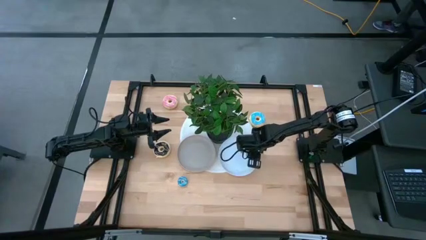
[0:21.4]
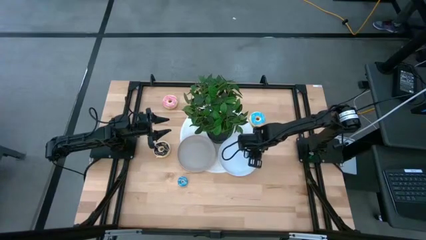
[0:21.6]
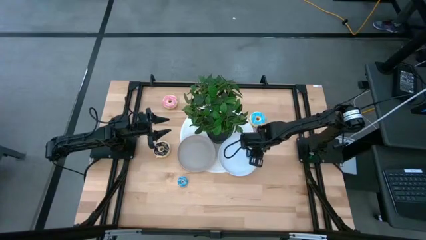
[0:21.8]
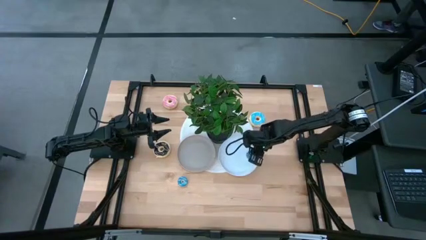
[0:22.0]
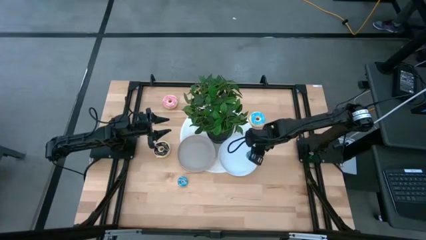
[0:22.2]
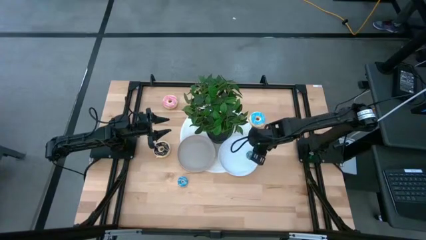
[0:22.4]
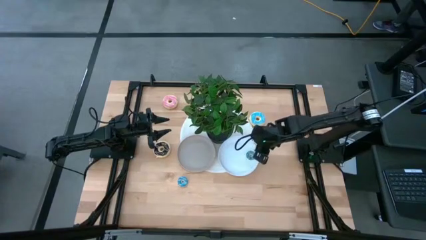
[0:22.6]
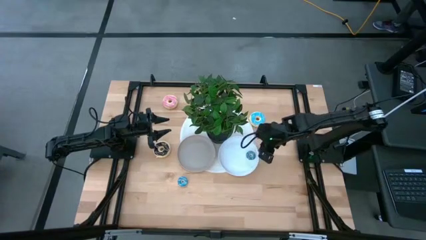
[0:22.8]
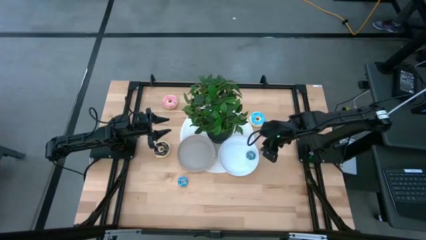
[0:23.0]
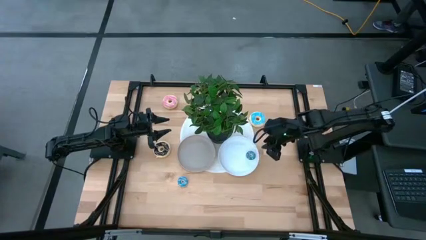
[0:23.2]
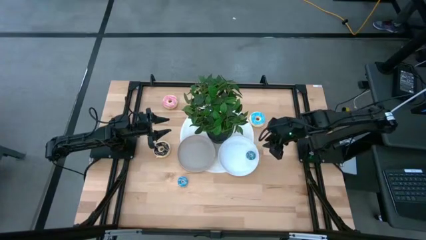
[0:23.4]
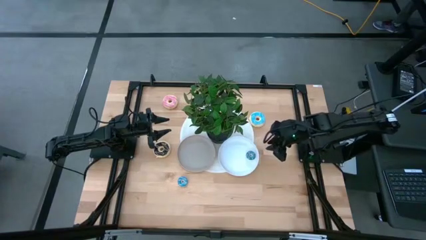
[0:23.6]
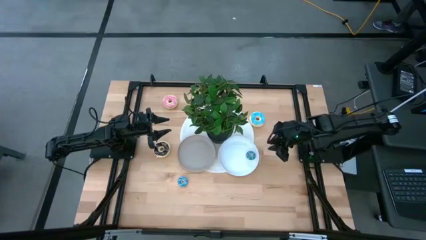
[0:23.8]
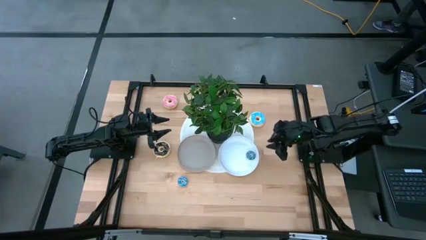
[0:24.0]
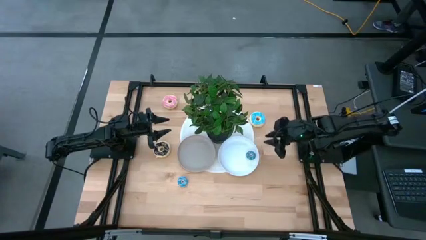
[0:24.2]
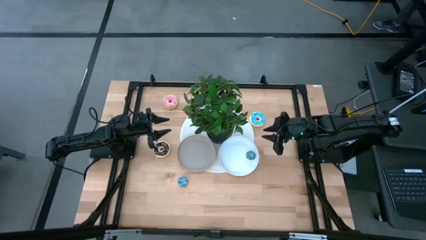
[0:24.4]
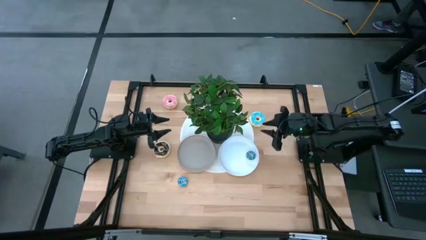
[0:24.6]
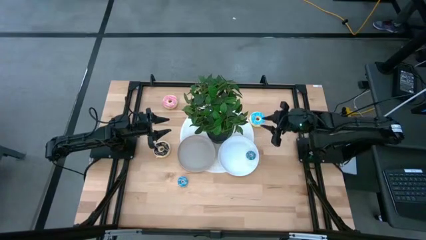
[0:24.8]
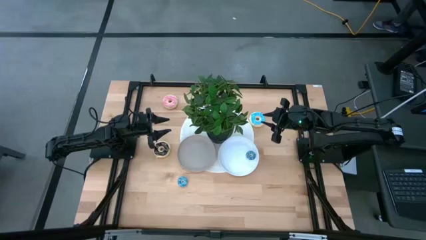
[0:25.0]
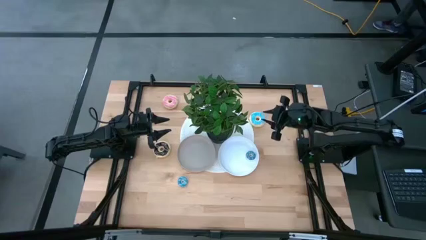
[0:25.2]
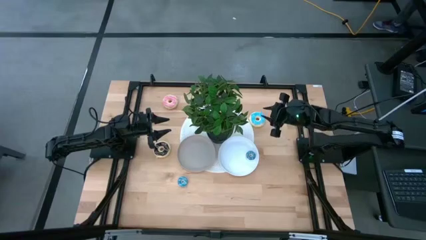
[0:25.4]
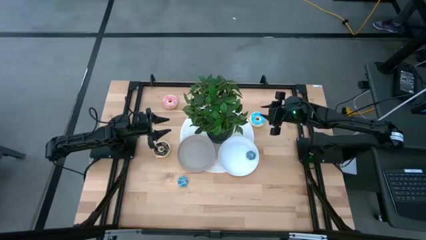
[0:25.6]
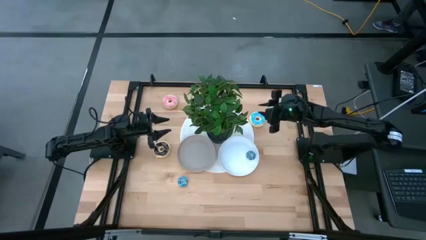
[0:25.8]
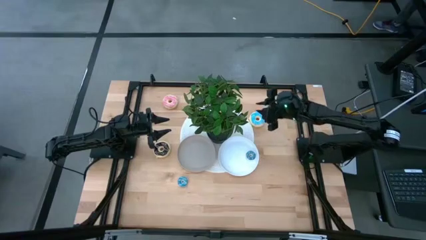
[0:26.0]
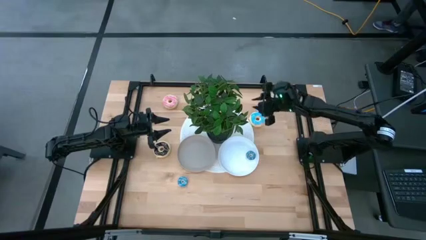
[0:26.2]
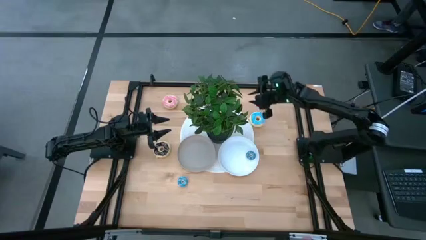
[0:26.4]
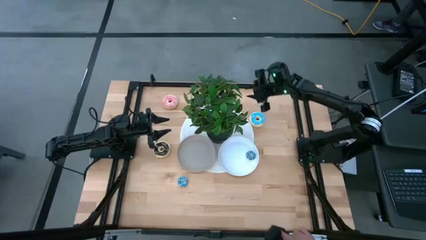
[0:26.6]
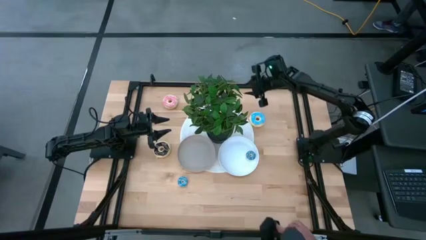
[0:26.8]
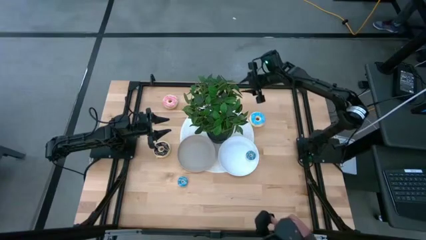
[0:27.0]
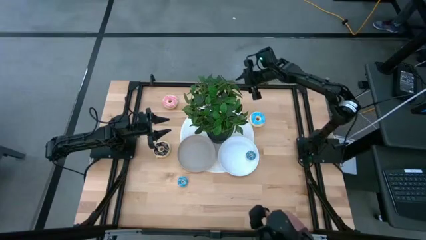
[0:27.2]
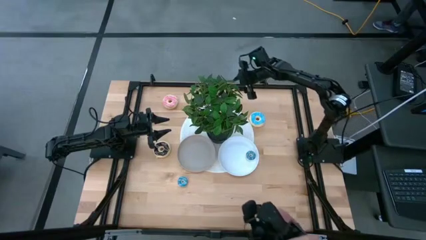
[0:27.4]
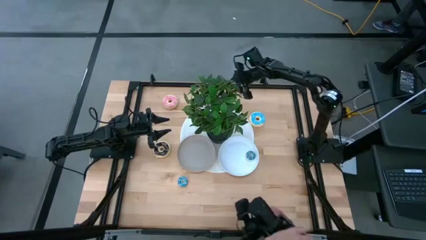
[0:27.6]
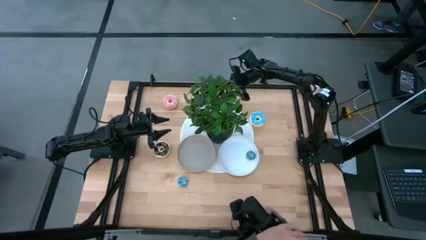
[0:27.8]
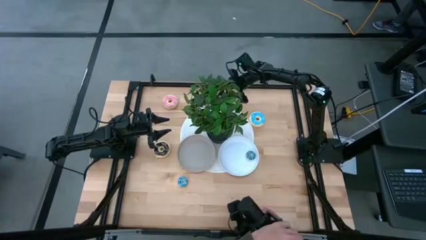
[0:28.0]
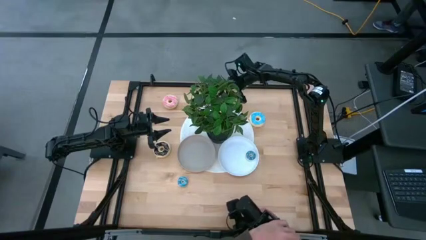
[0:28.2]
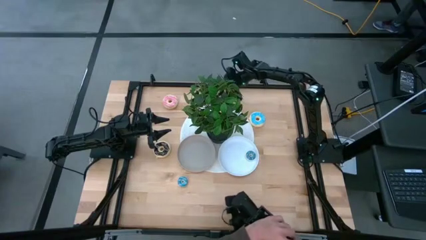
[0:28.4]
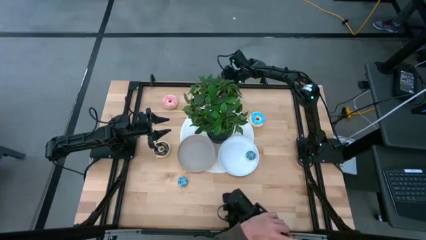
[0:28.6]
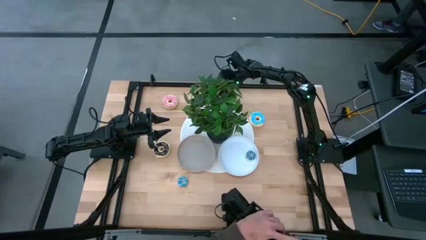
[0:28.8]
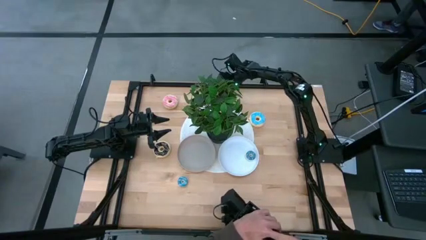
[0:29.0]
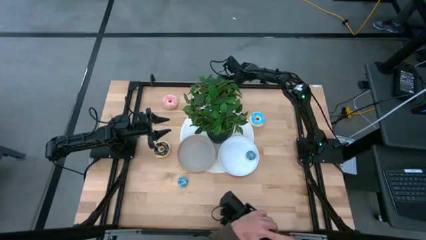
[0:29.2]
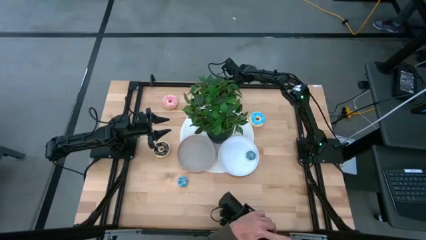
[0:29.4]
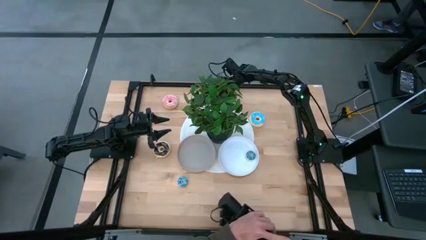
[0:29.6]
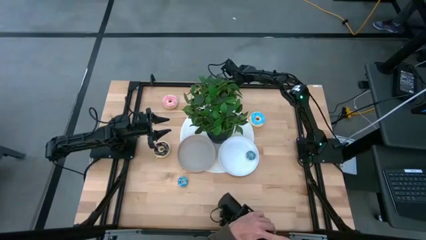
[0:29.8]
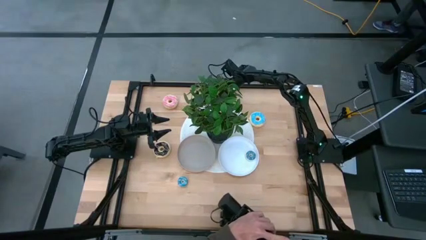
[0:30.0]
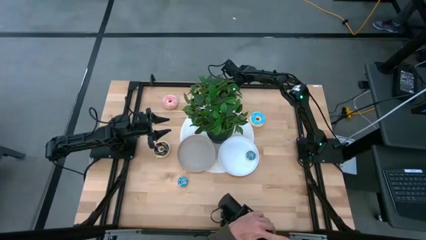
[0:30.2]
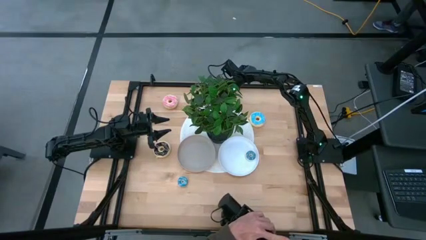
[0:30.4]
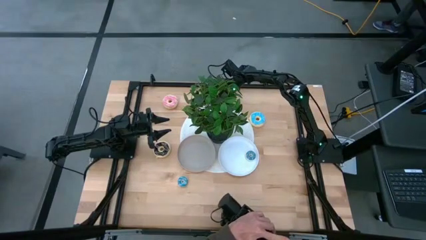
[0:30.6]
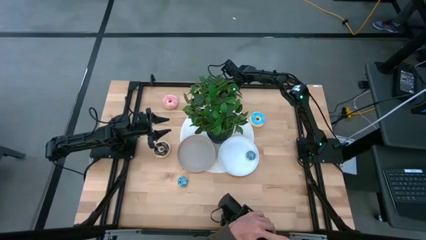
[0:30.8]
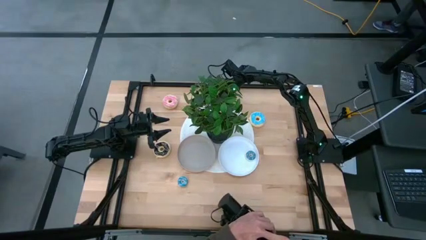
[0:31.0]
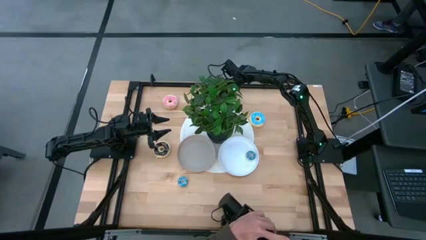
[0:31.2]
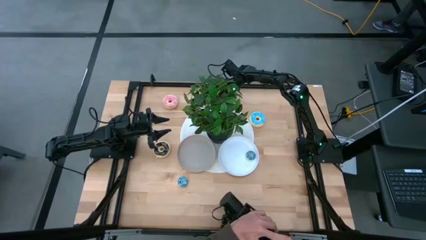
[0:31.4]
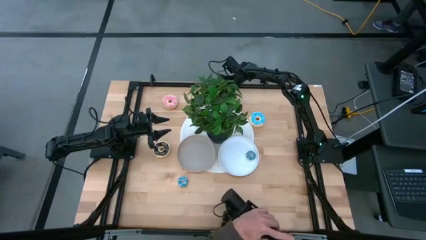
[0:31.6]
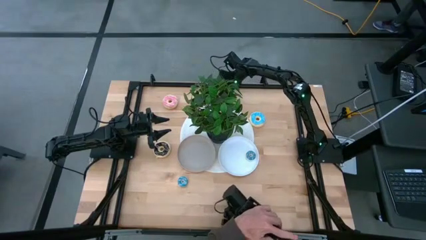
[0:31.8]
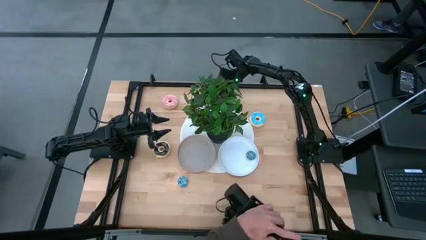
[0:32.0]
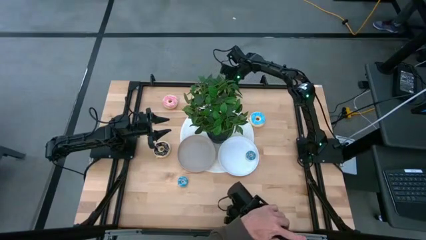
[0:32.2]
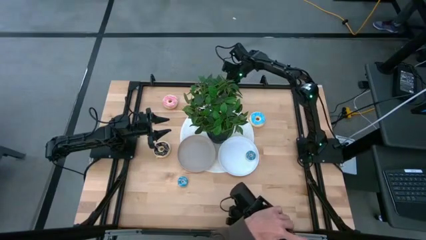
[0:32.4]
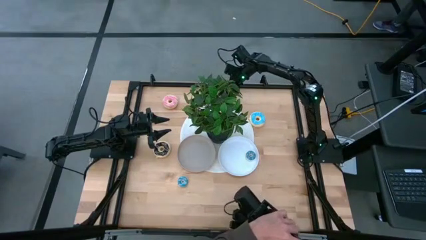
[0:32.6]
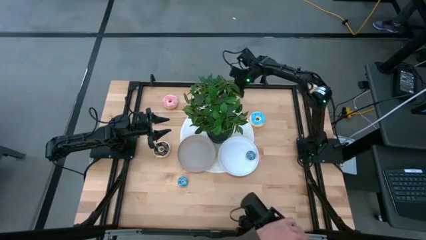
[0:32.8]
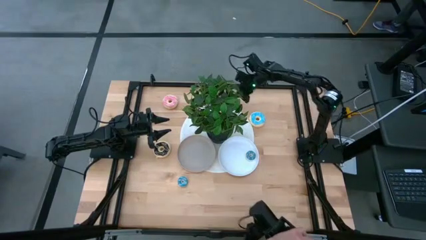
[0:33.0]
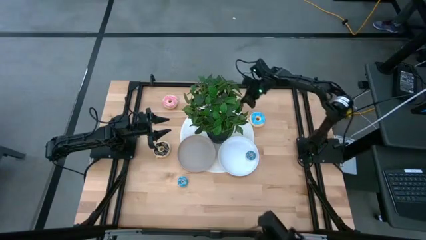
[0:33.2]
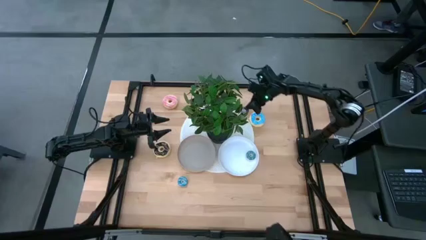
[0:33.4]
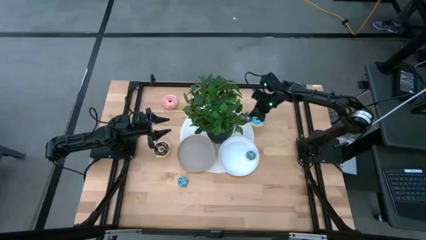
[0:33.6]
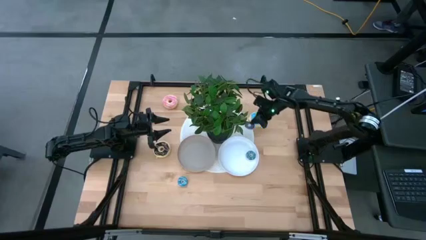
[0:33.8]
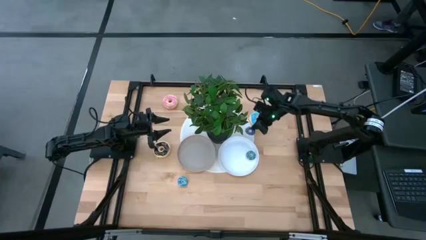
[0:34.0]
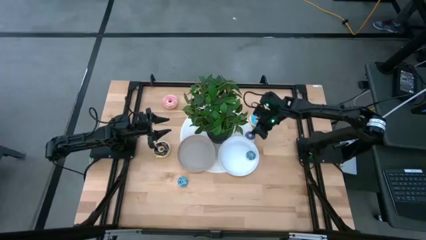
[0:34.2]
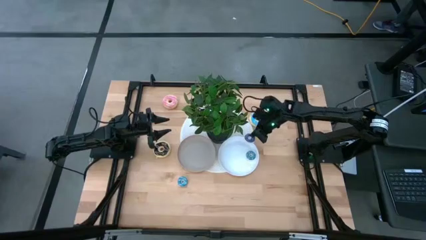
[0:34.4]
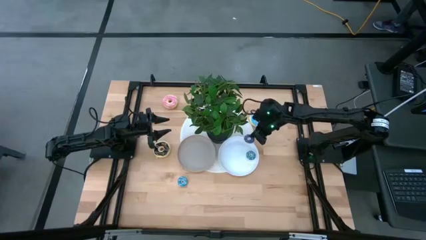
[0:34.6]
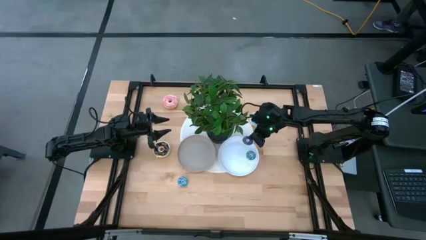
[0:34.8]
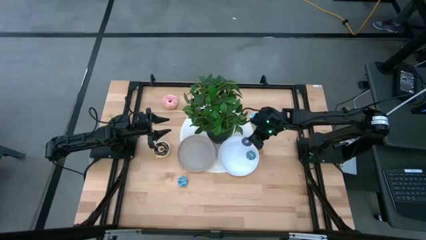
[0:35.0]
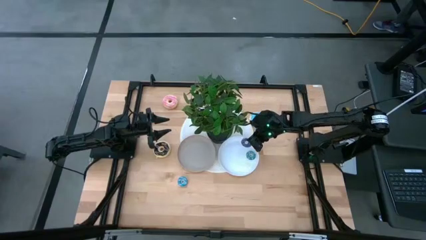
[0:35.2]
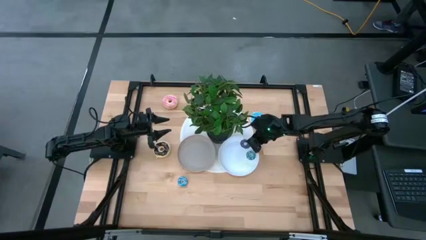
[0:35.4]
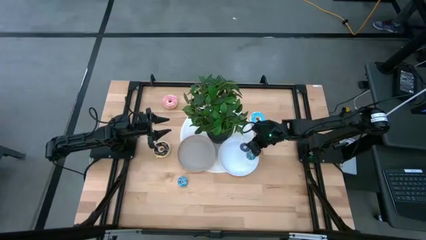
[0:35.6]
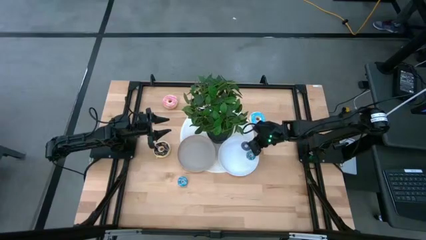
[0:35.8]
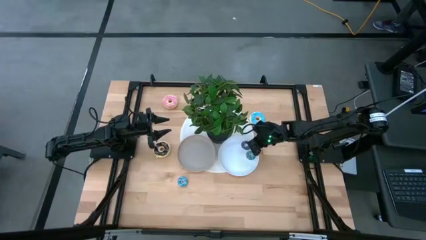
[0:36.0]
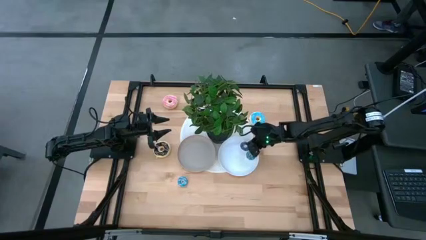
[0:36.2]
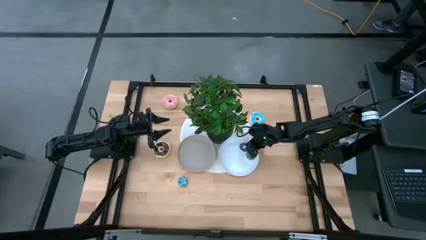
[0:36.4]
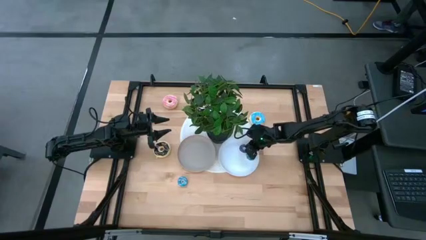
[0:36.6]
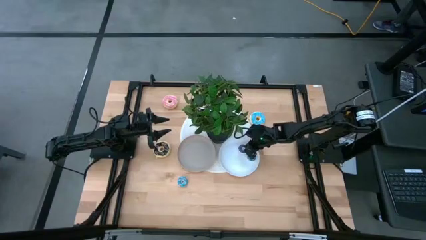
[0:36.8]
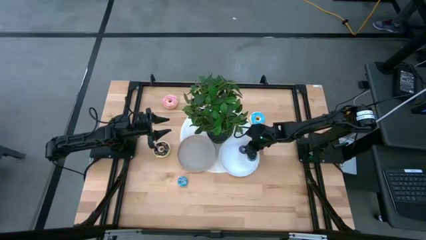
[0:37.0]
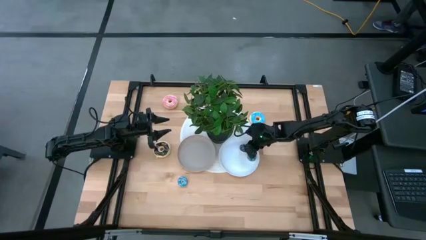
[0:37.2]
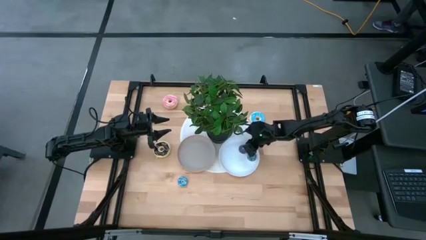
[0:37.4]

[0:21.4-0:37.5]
Task: Pick & Place donuts
Put the top small dark blue donut on the white plate
